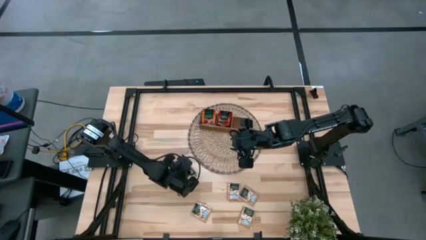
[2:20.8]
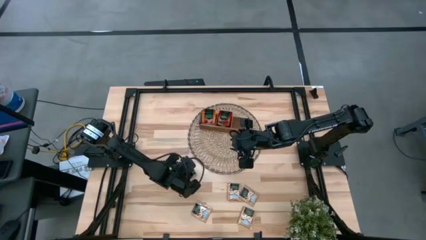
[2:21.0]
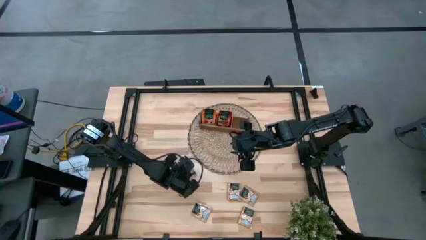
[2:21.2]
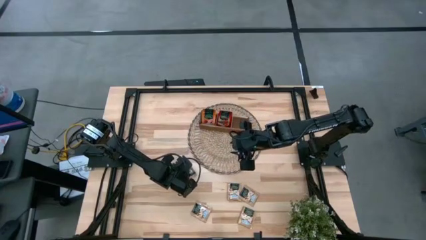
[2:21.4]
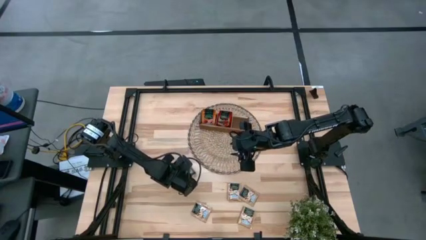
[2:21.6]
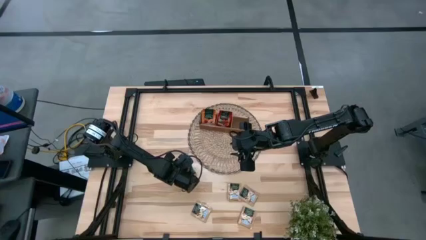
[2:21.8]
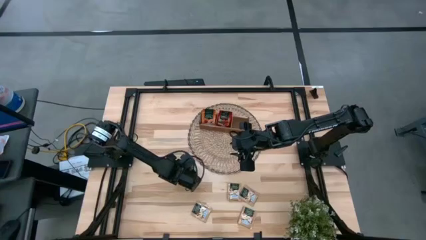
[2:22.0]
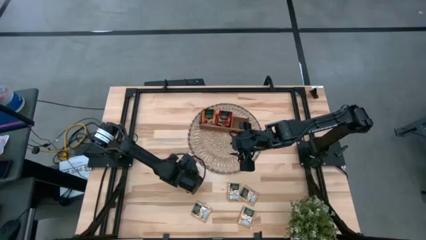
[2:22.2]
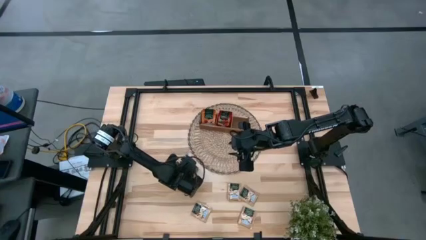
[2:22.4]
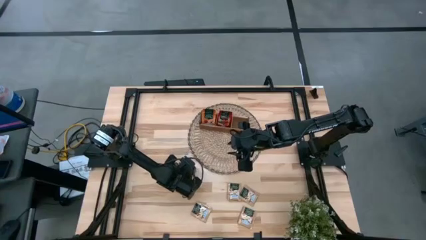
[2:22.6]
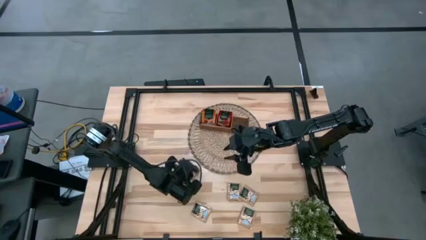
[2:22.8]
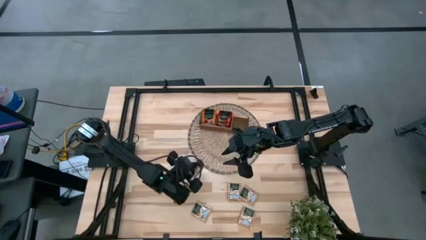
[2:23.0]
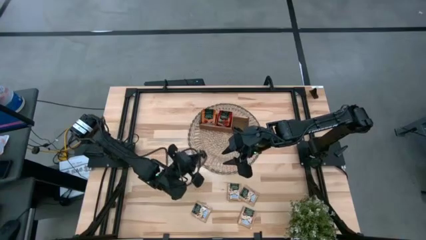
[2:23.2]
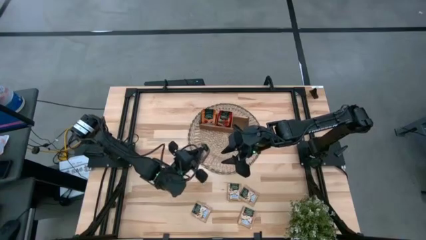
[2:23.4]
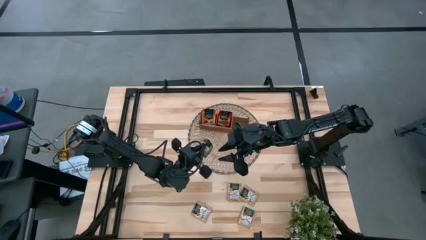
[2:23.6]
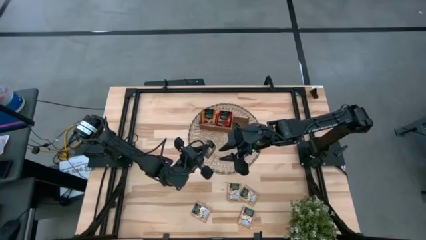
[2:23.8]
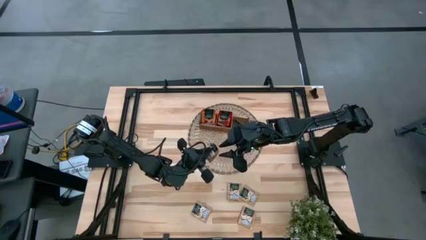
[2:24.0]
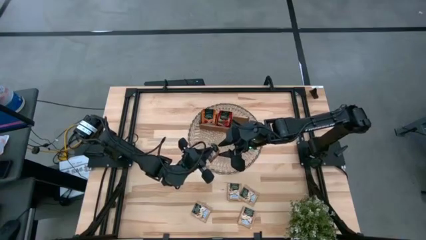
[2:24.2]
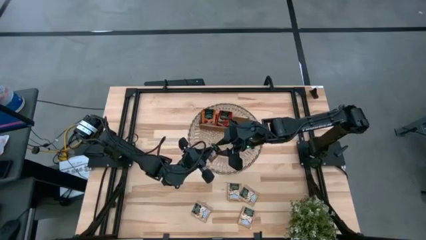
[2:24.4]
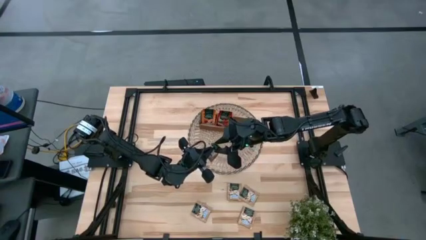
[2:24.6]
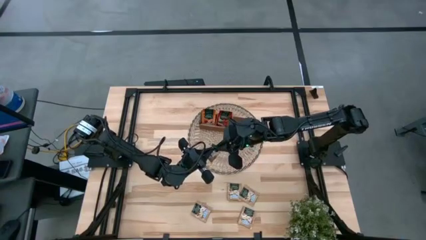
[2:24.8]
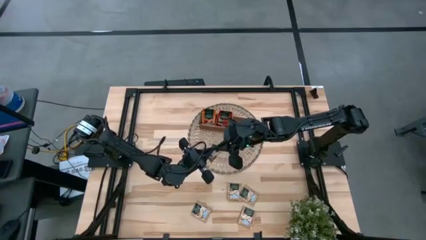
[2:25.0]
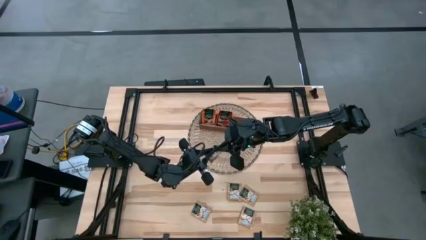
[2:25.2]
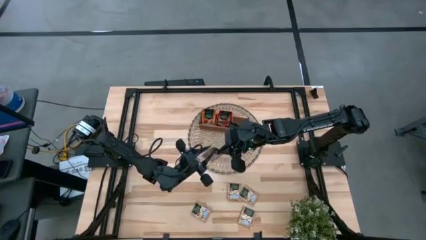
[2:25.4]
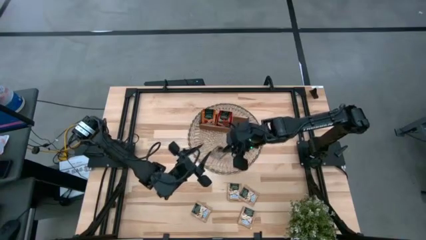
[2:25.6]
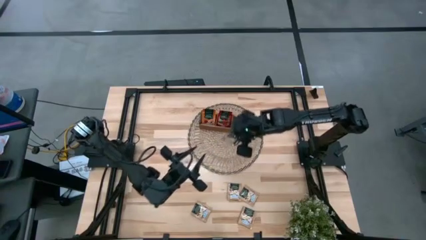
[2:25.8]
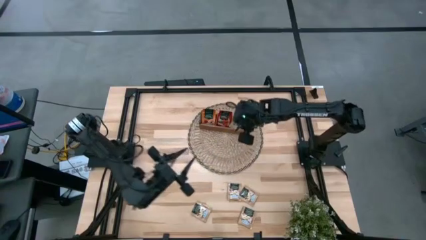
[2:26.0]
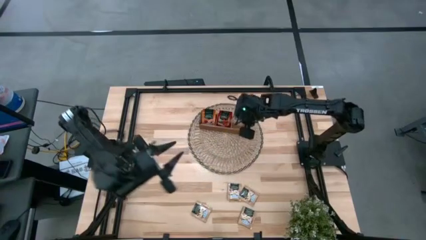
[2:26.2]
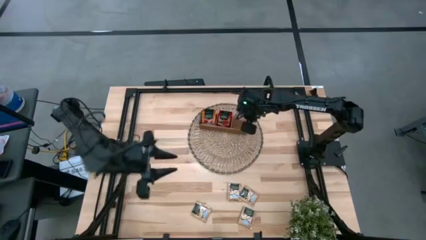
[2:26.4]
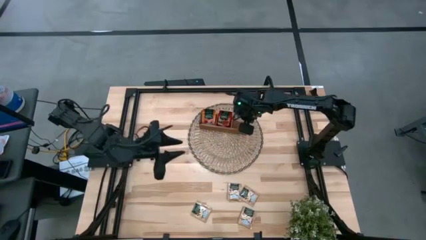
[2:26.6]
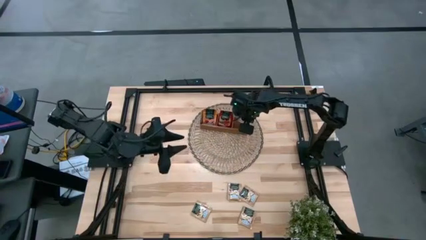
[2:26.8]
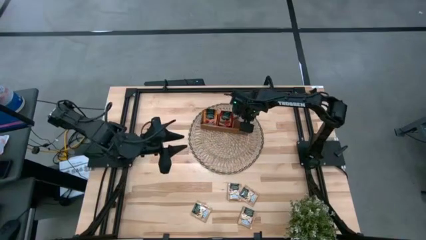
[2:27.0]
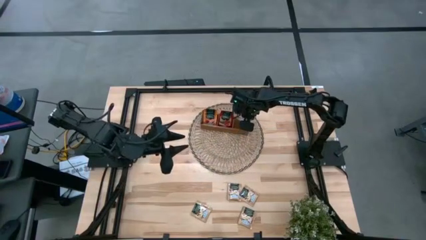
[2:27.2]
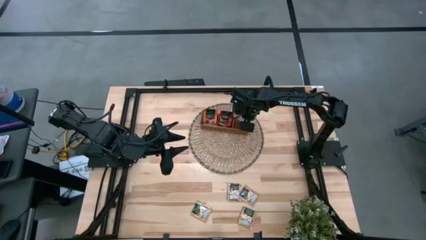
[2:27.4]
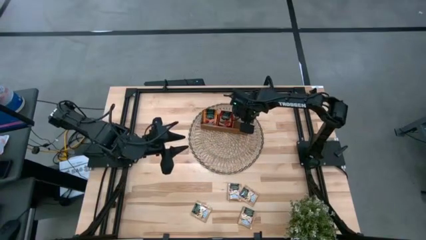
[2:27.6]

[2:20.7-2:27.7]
Task: Pick & Place Tea
Put the brown tea bag into the right section of the wooden organizer

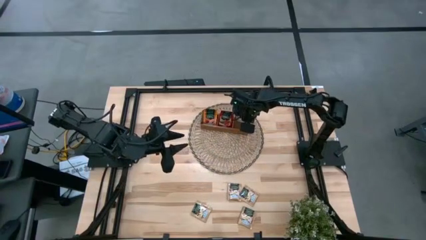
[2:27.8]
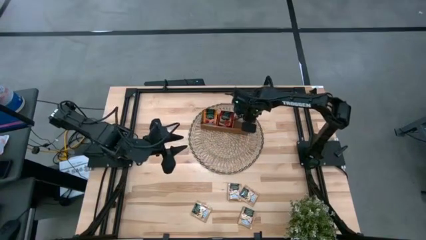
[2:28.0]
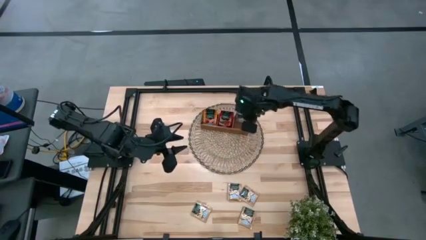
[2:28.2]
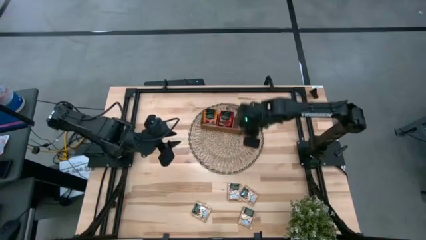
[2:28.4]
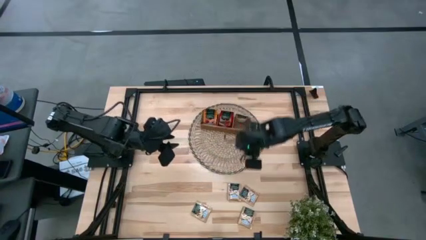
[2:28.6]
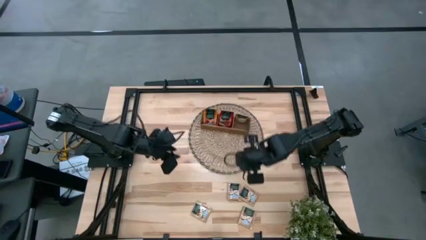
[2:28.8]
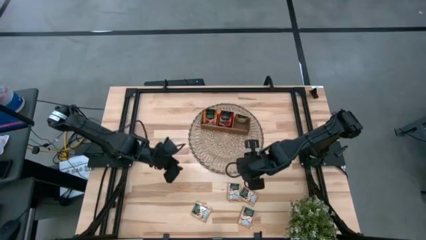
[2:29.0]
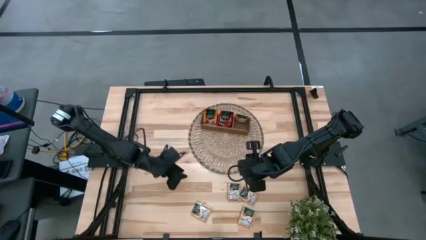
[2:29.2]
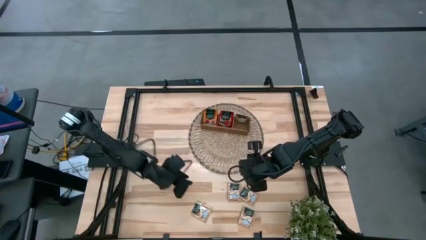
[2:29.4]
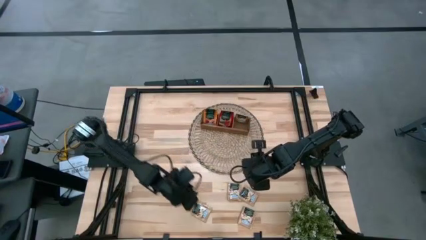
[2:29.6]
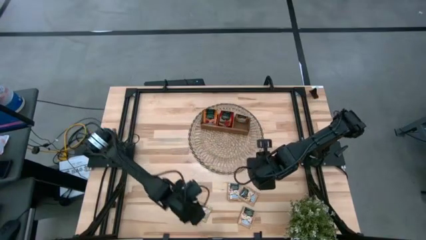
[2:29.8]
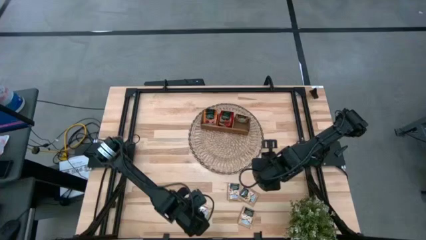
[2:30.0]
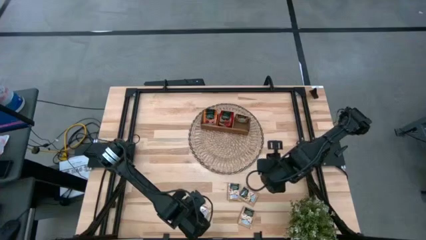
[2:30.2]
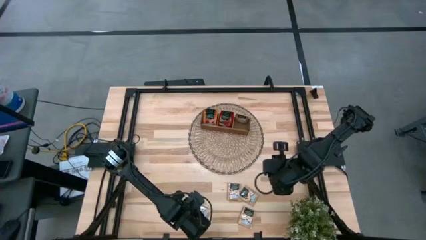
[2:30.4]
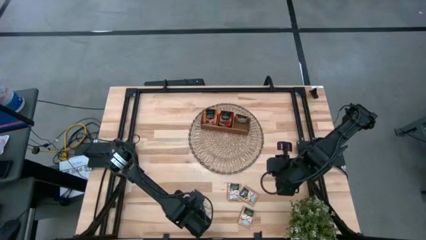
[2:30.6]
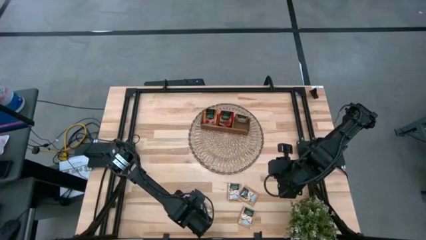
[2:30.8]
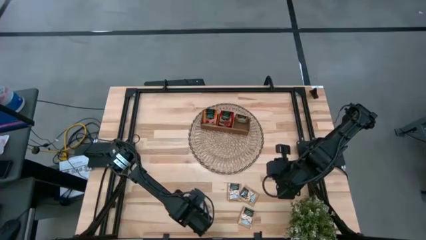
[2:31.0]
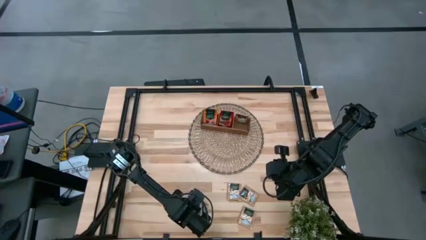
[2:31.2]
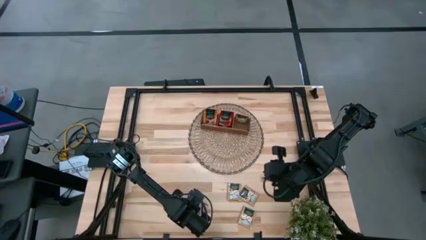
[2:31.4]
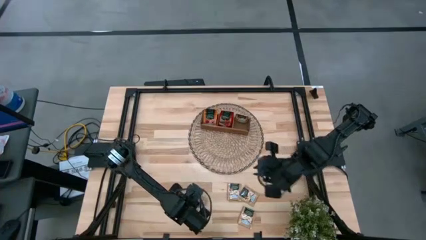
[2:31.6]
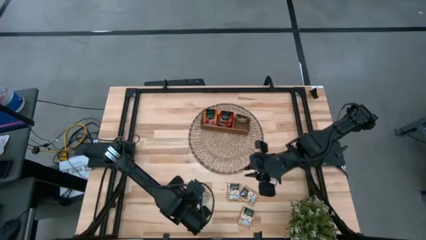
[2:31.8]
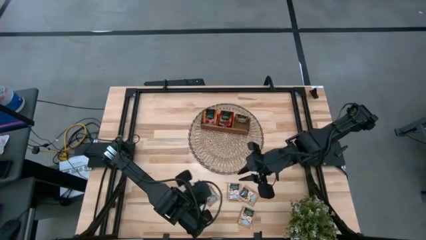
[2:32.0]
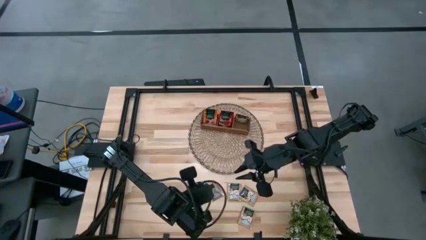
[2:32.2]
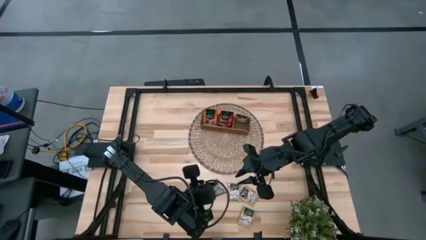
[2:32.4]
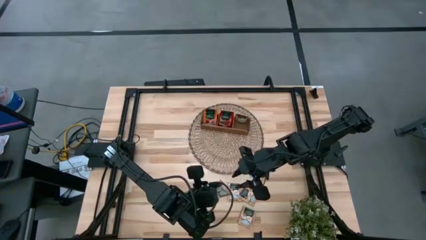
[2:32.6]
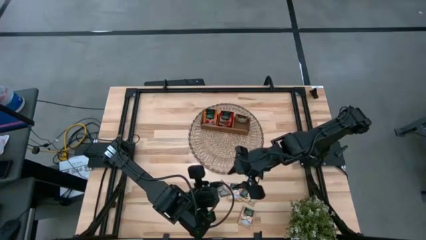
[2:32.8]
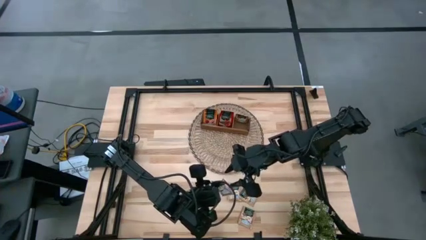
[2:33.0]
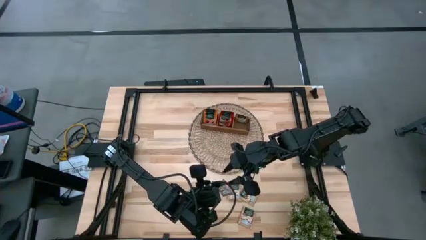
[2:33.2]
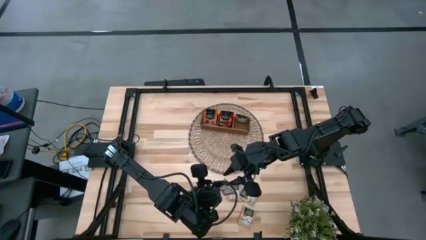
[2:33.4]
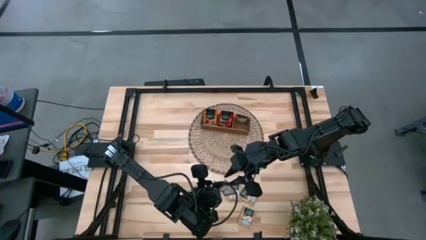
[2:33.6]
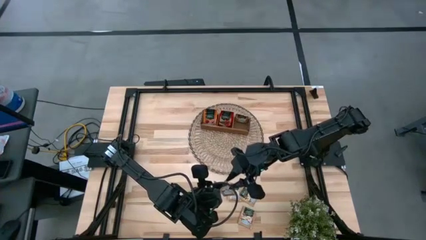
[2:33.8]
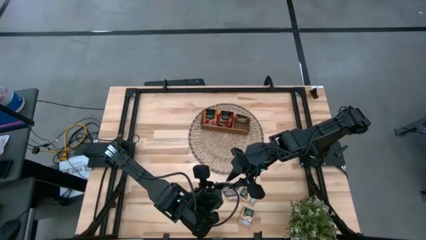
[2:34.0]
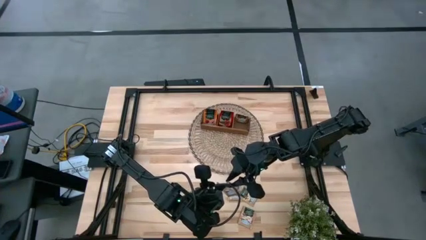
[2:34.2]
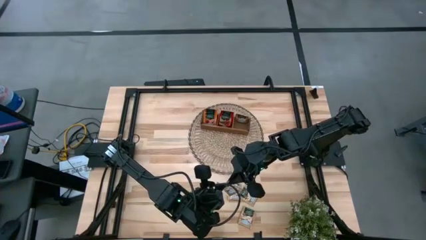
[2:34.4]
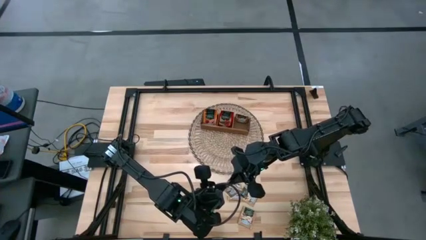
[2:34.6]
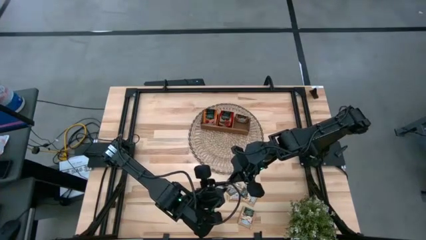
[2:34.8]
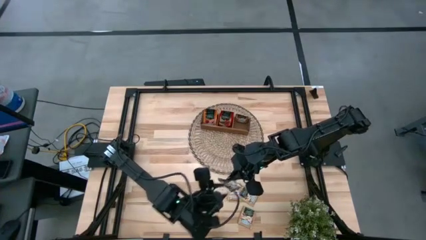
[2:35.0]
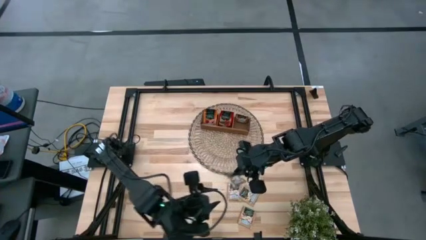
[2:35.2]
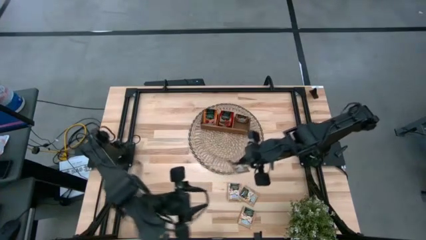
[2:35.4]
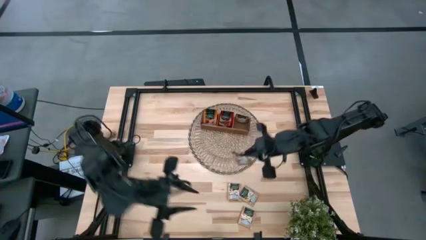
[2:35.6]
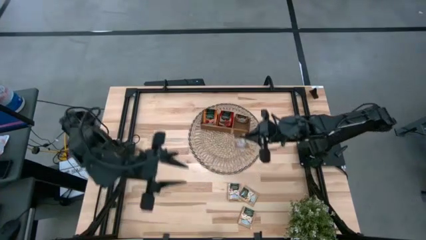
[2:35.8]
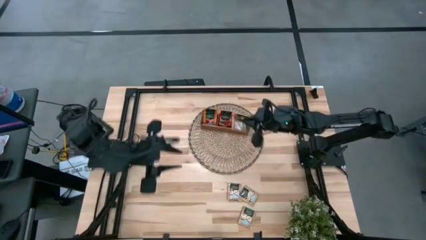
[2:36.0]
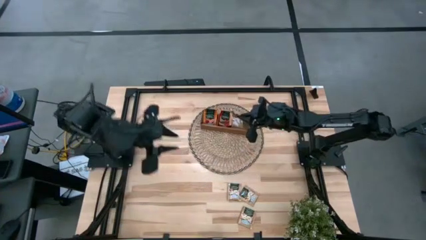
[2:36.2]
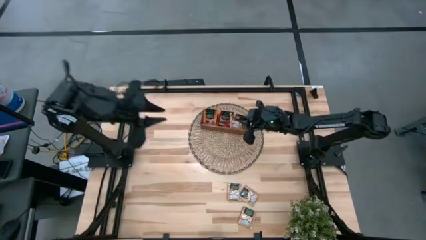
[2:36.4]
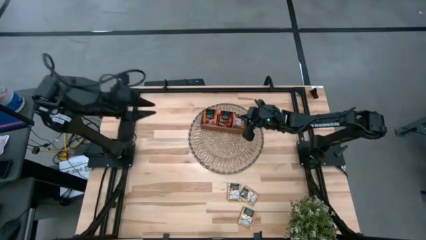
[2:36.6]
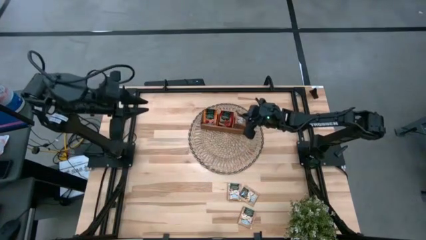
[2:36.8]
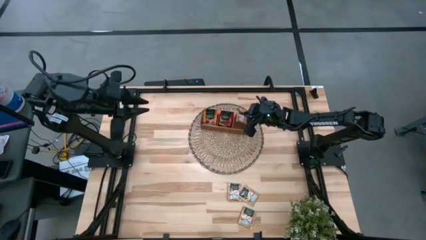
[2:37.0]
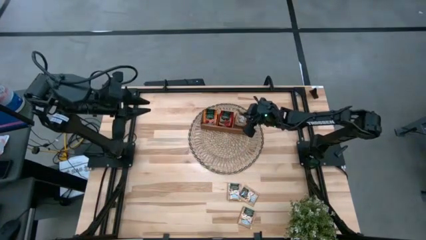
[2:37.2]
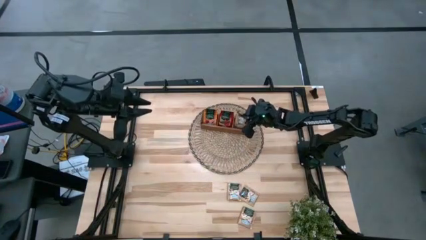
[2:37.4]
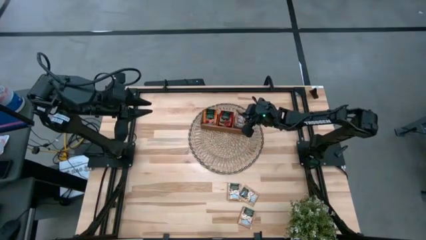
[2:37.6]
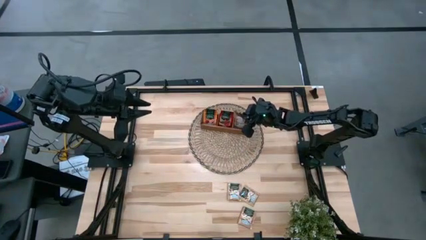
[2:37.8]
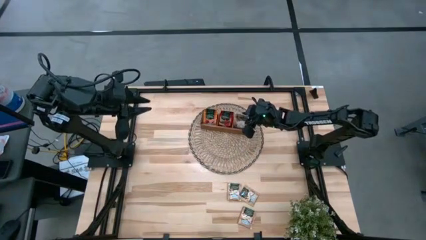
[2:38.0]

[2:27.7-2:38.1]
Put the brown tea bag into the right section of the wooden organizer
